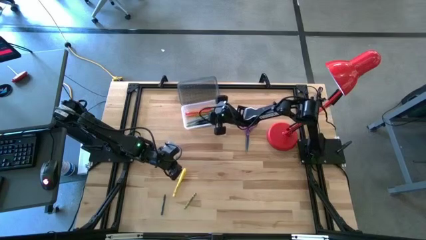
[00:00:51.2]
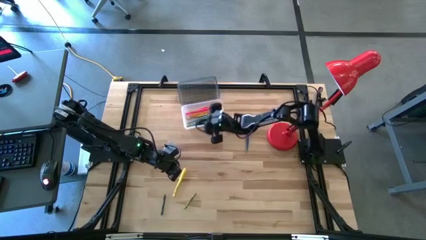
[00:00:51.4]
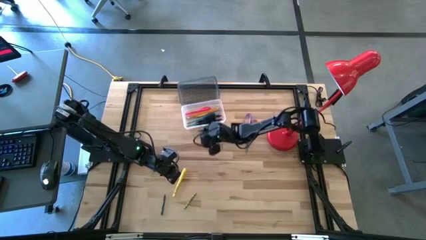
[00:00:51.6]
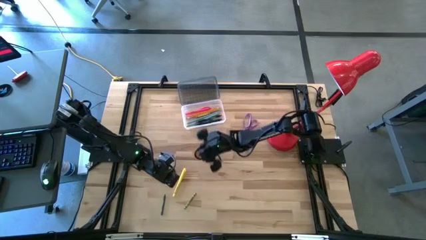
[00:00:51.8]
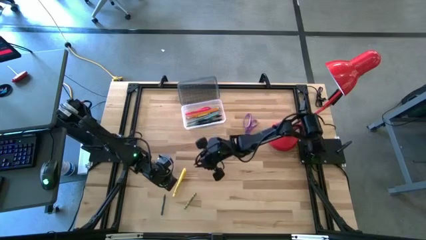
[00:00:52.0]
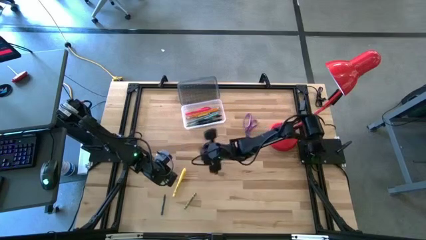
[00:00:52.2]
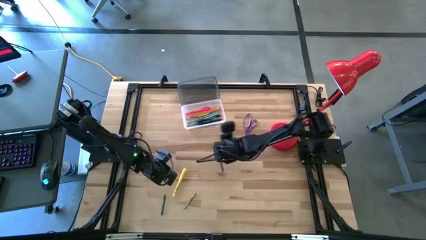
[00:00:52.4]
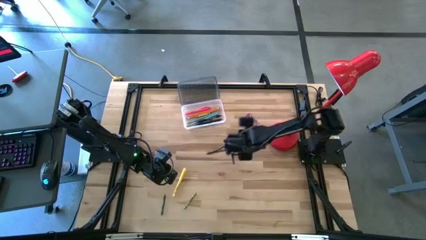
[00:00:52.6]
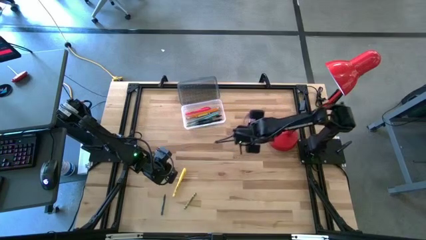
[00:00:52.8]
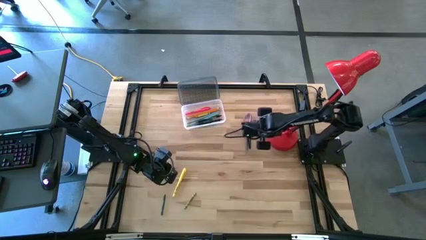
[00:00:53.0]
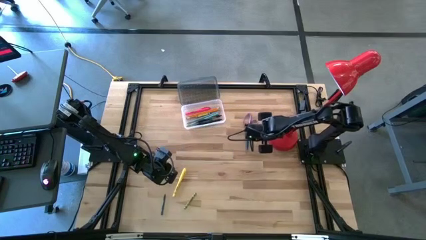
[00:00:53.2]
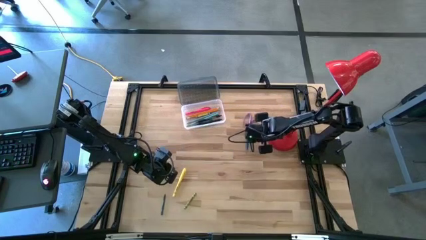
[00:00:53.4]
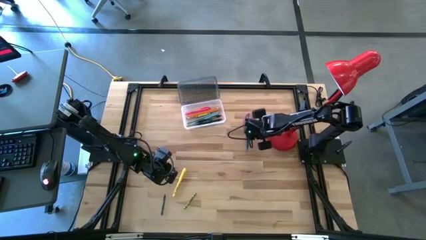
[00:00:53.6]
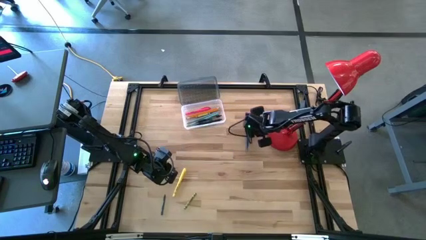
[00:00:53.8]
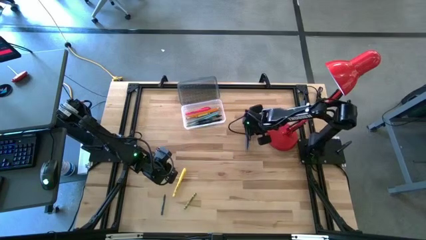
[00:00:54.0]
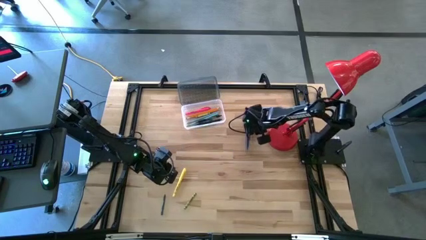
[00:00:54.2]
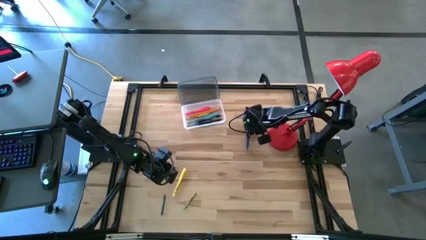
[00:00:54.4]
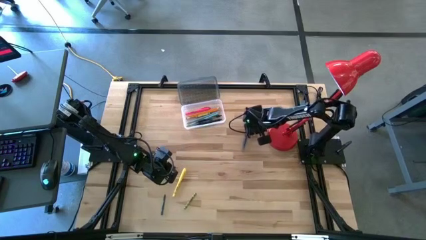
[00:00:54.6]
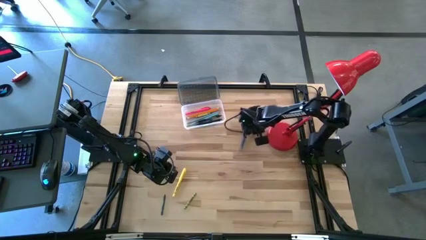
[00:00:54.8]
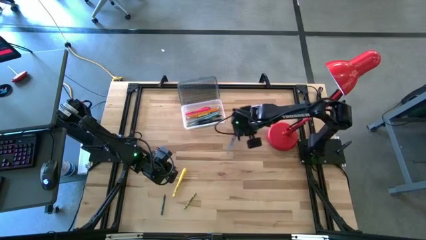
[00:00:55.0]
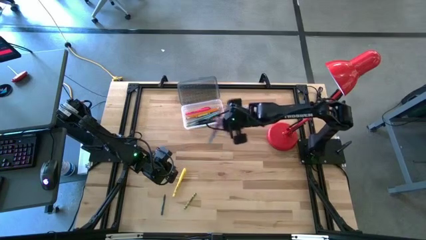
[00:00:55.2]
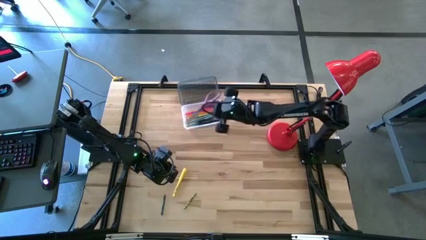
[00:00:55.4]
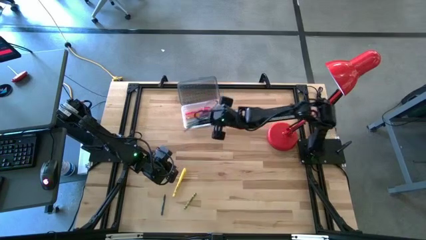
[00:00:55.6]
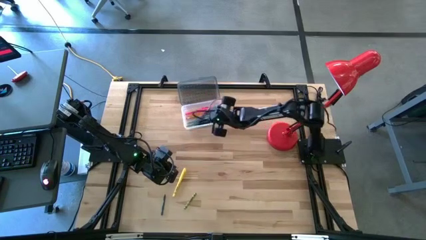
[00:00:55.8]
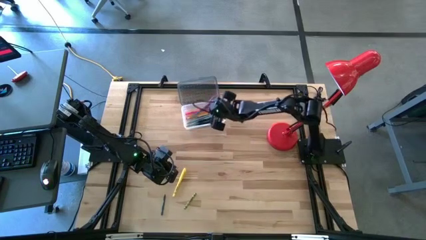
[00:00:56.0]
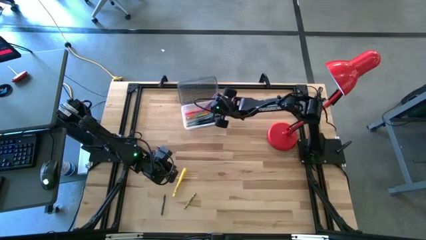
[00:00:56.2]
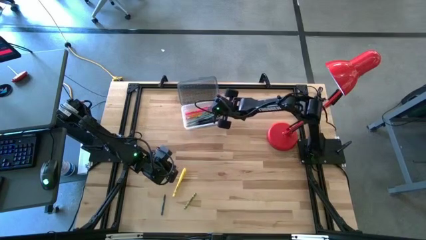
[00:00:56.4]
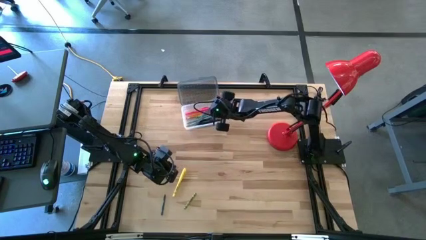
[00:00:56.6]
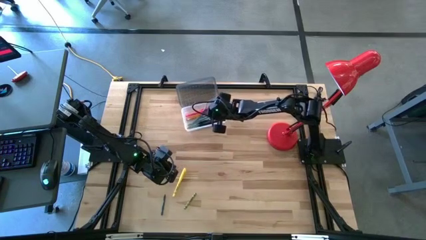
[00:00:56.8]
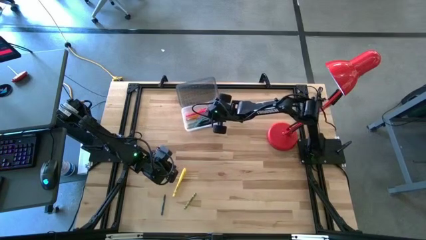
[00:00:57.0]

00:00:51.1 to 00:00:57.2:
Task: Pick & place school supplies into a supply box
Put the purple scissors into the supplies box

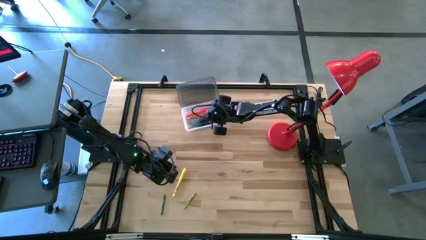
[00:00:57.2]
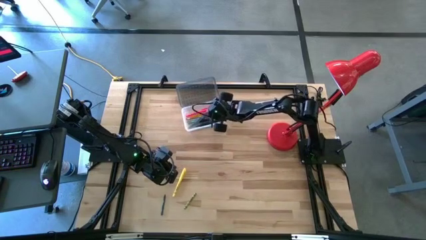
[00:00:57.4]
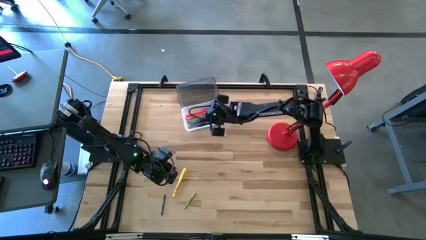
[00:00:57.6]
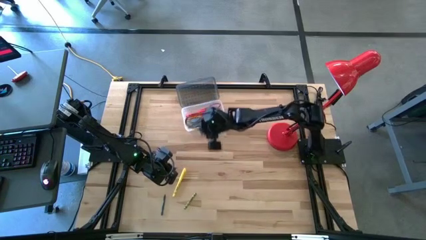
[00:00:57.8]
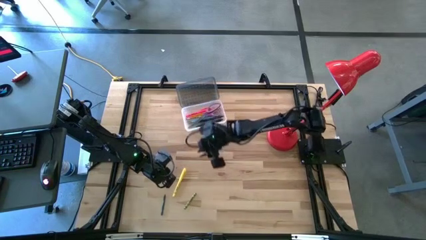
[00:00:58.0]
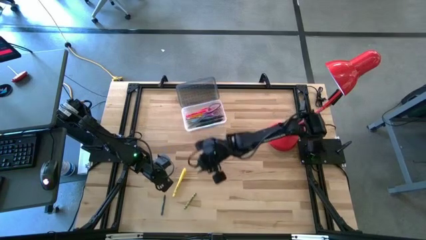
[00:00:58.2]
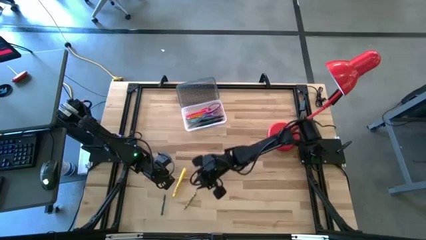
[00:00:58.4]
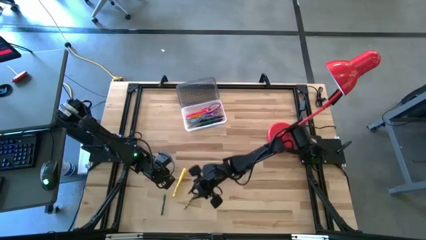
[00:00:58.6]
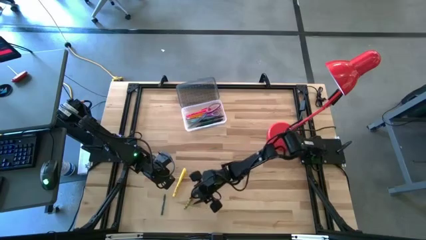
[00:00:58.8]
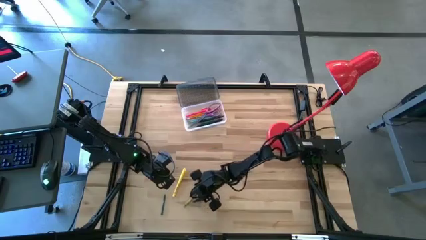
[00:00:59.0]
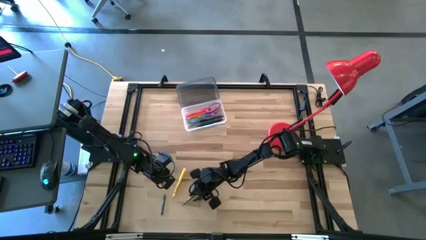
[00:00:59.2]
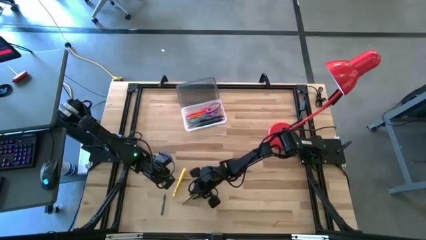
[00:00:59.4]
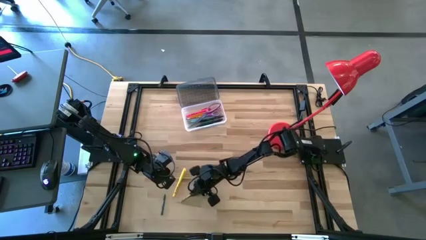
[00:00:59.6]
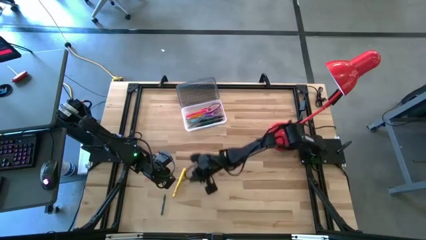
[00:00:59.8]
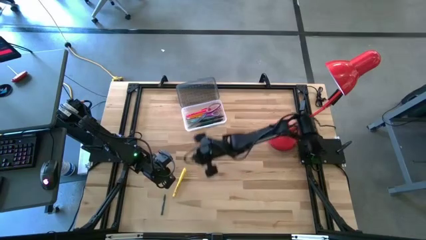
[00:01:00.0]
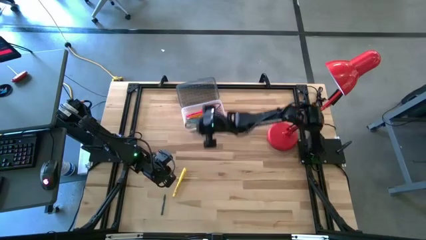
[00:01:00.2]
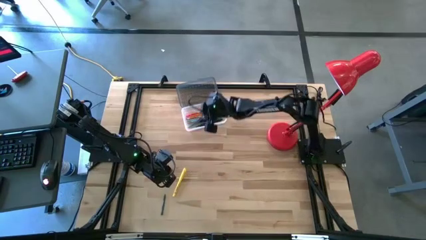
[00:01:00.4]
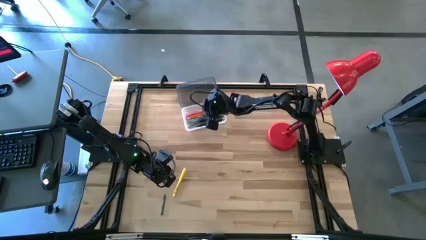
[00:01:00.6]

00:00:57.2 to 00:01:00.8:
Put the green crayon into the supplies box

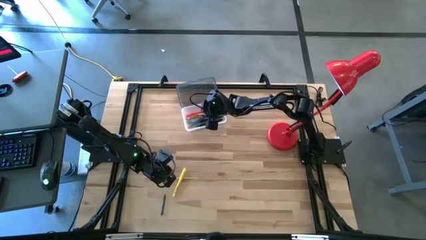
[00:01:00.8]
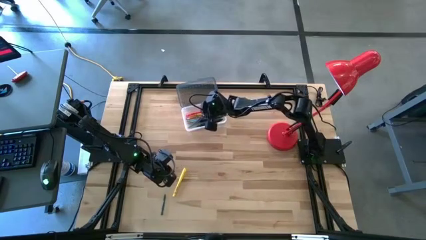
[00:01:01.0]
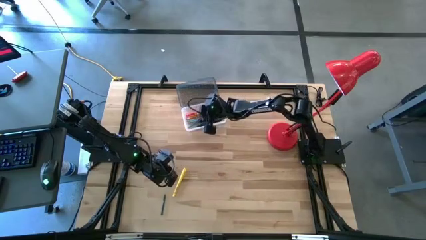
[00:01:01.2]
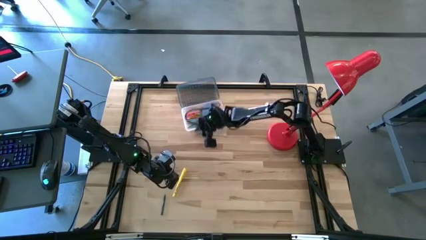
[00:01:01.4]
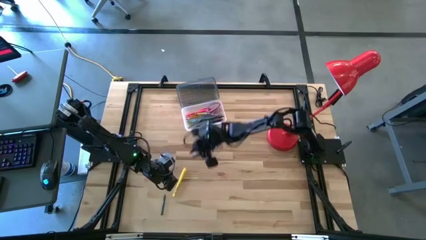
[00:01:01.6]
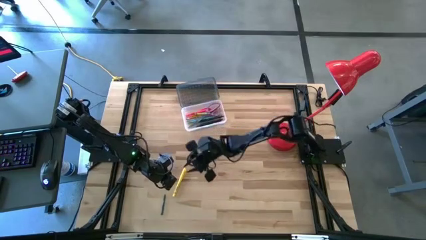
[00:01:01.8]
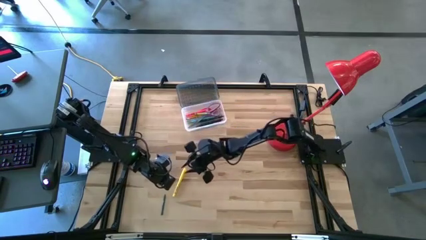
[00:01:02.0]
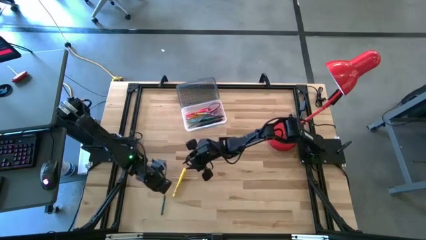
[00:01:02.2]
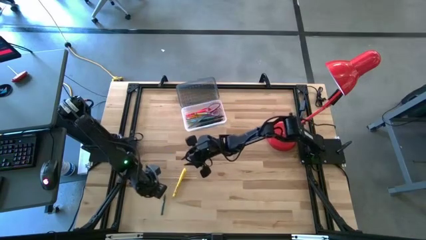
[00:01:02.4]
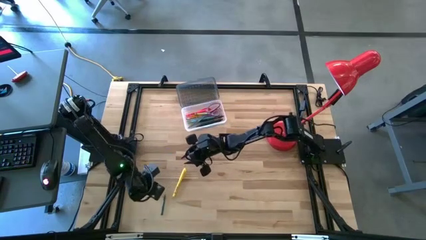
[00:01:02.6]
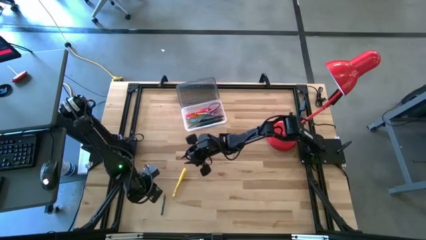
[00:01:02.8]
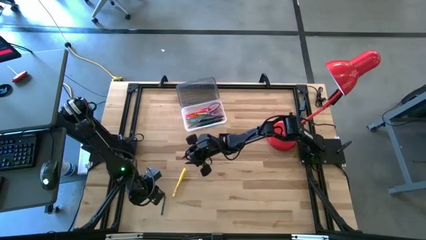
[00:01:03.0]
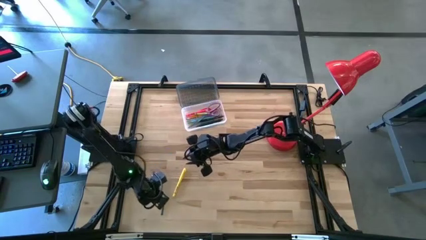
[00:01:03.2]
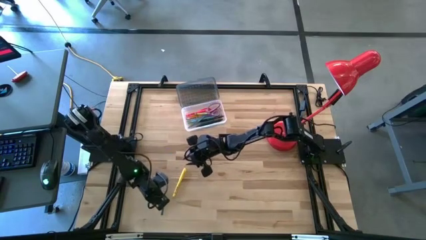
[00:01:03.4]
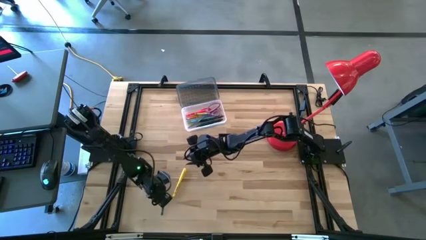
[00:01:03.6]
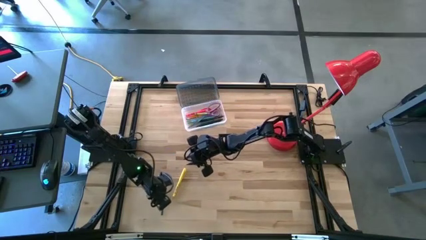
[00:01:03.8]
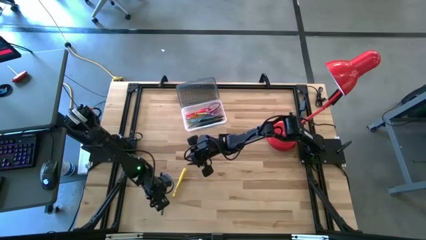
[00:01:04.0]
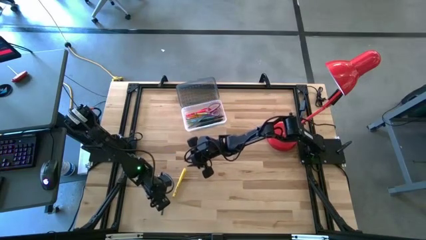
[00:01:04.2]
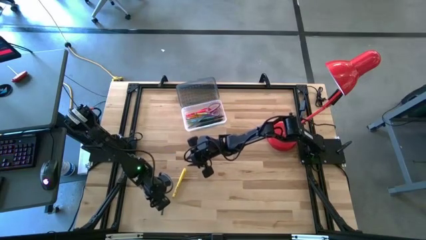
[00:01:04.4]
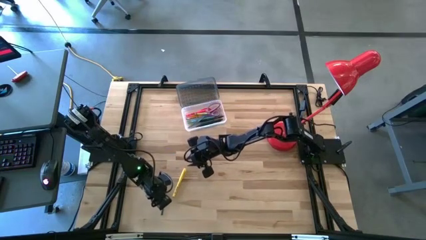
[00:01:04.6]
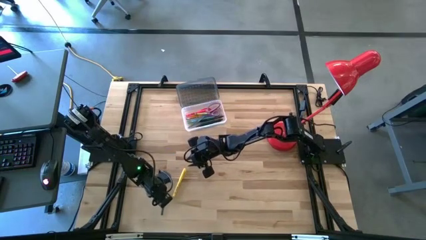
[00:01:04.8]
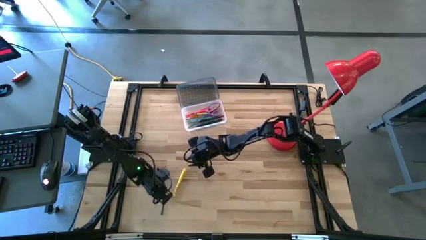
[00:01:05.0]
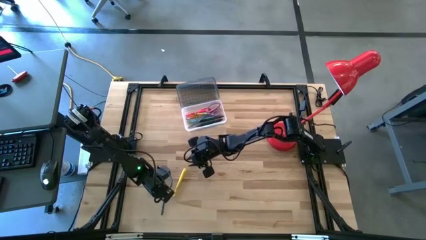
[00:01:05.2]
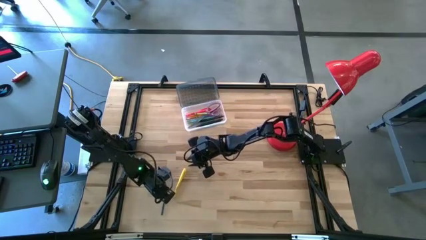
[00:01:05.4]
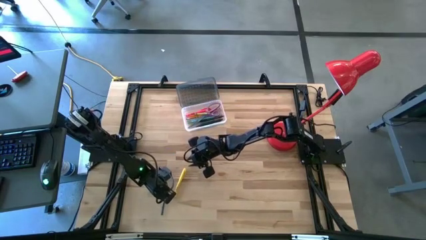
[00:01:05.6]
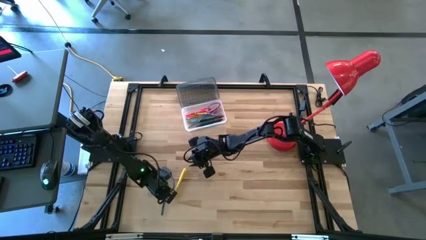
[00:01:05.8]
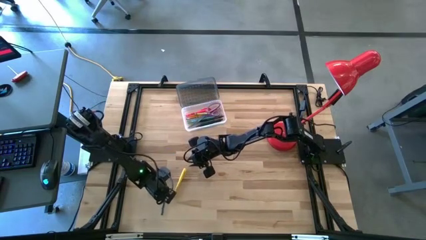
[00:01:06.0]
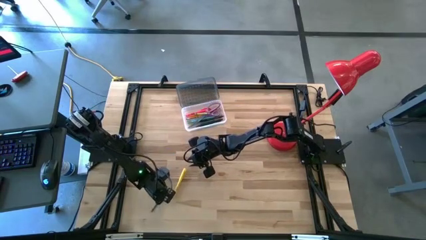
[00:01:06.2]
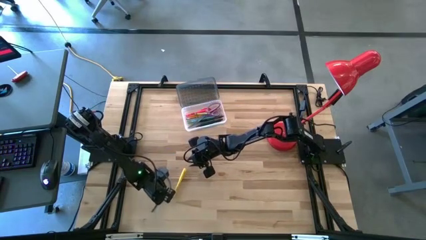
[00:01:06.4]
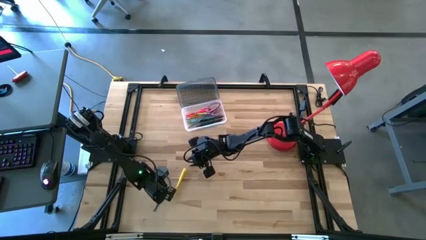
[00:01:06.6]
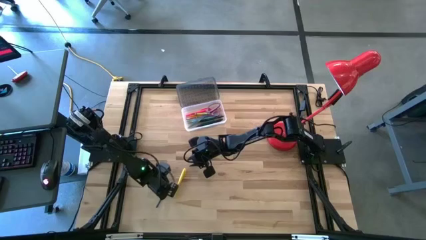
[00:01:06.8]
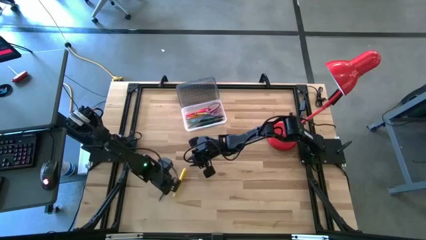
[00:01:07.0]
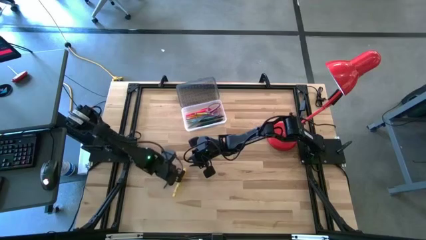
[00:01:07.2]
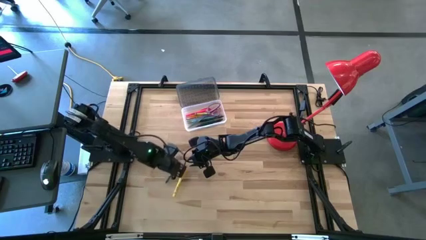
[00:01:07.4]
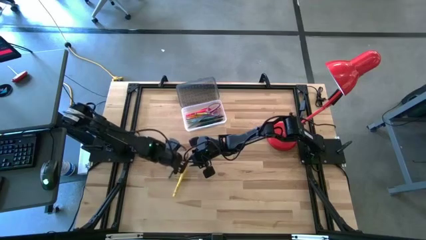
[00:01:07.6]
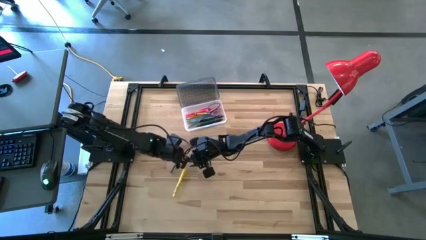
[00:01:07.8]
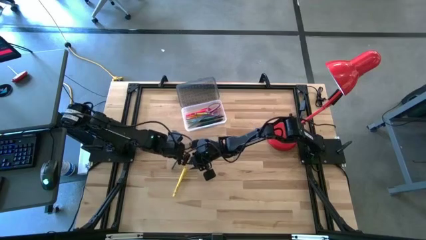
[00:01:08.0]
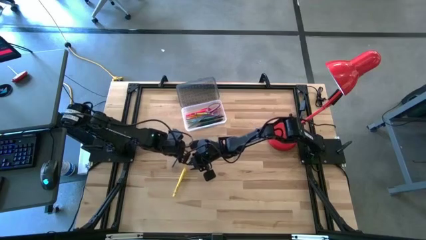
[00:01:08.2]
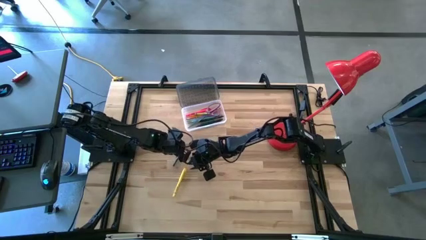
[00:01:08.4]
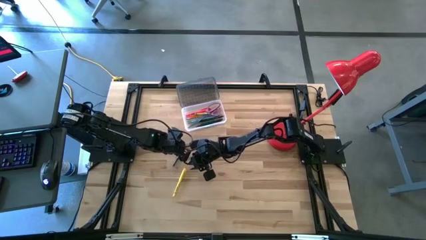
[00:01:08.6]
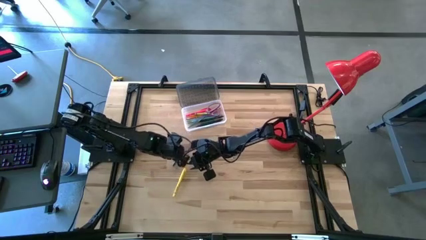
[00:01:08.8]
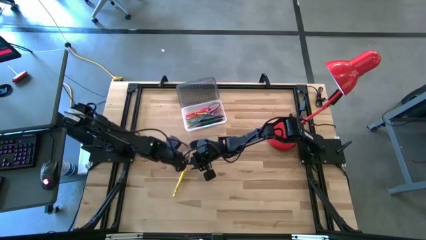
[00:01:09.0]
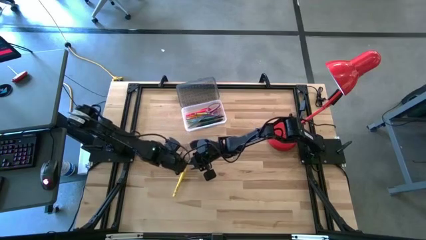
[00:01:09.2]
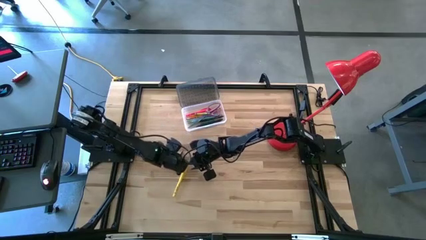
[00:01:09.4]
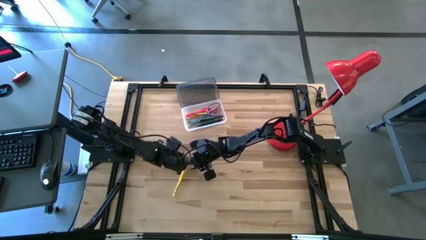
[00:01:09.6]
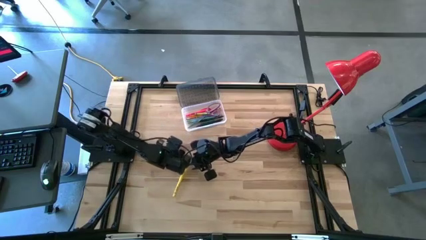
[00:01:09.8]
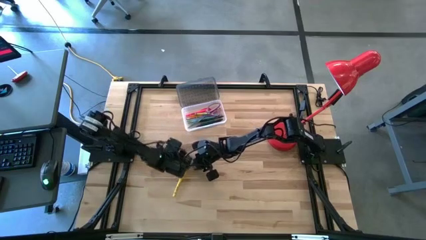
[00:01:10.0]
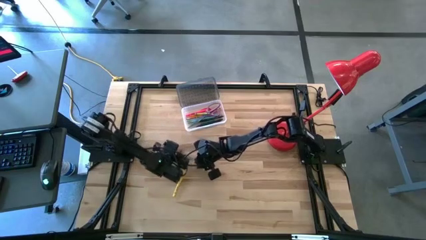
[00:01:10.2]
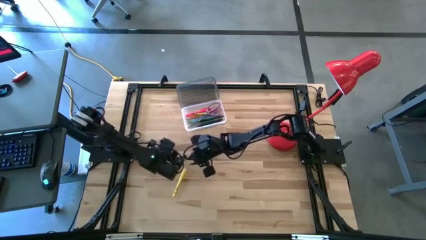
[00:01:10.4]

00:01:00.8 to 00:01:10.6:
Move the dark green crayon to the top of the yellow pen
